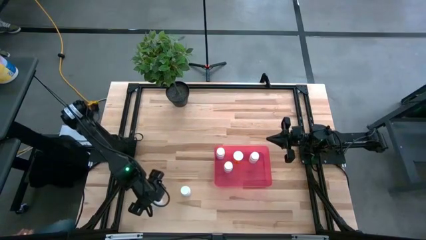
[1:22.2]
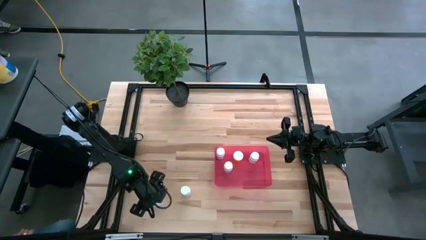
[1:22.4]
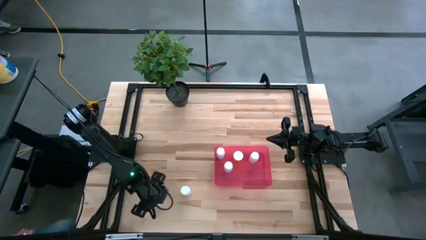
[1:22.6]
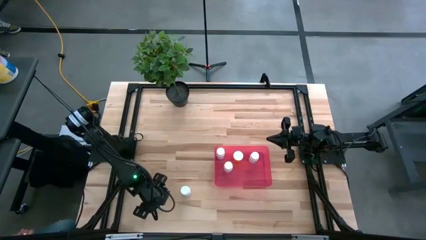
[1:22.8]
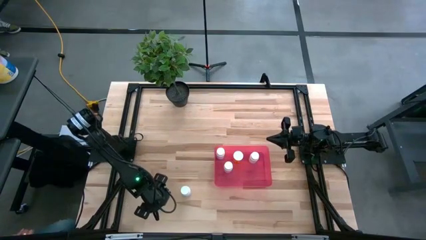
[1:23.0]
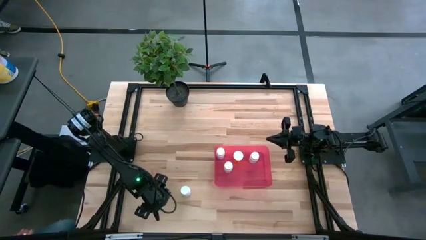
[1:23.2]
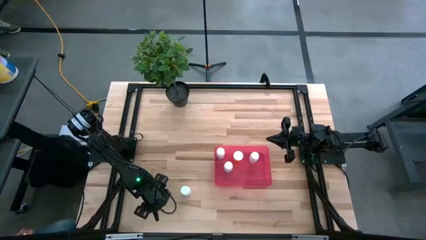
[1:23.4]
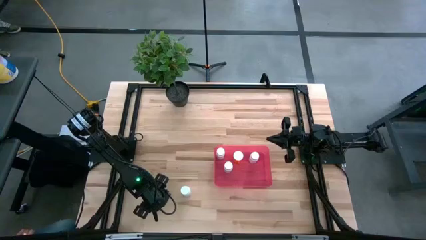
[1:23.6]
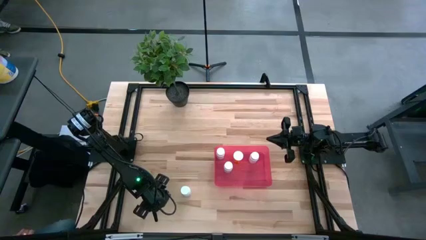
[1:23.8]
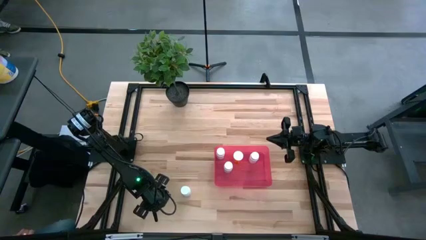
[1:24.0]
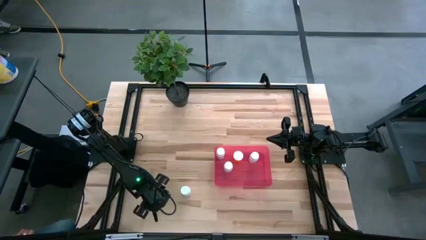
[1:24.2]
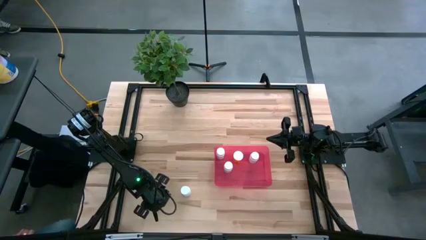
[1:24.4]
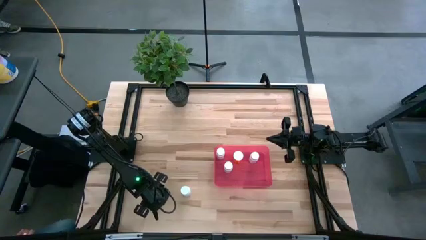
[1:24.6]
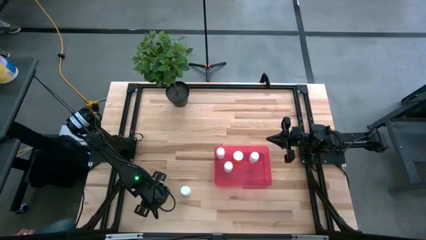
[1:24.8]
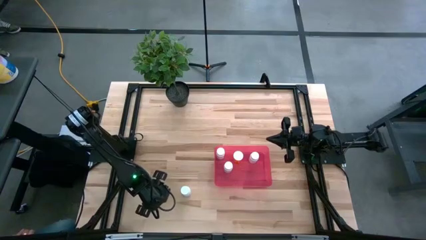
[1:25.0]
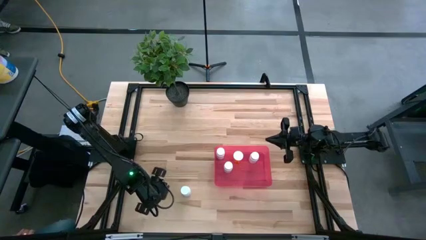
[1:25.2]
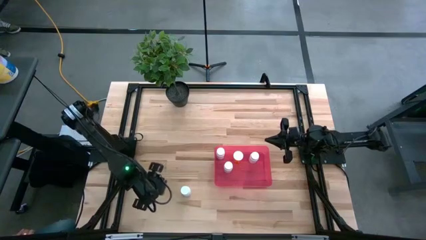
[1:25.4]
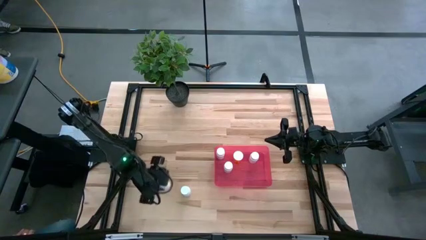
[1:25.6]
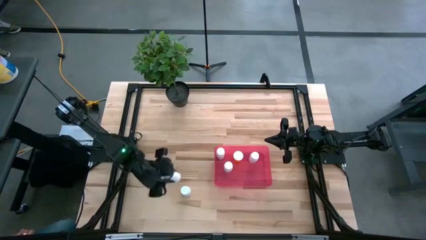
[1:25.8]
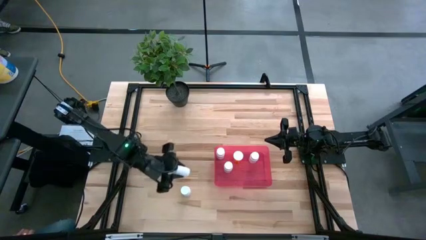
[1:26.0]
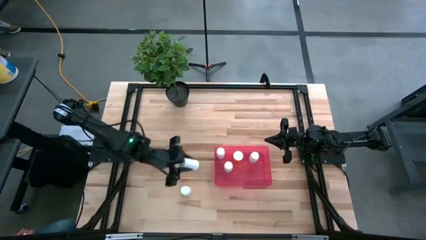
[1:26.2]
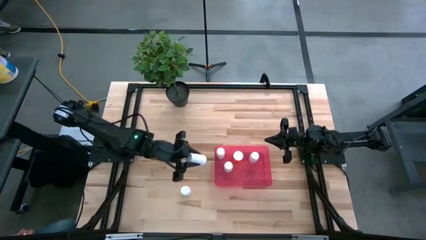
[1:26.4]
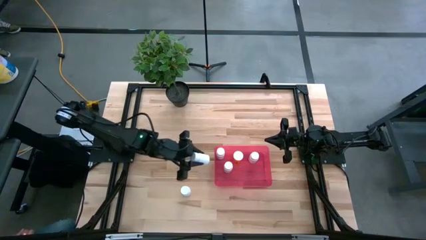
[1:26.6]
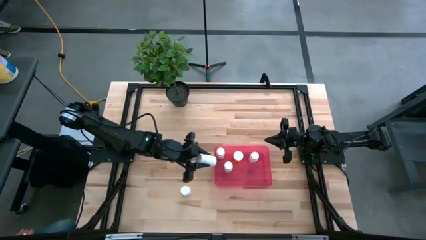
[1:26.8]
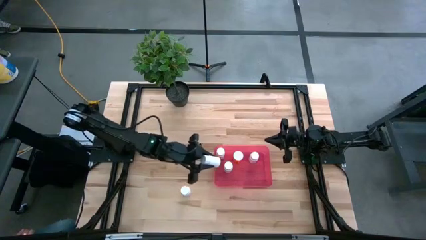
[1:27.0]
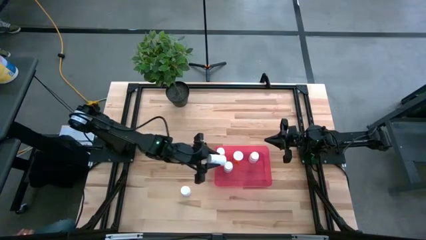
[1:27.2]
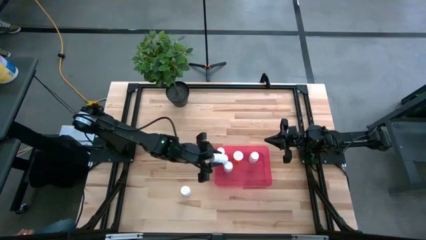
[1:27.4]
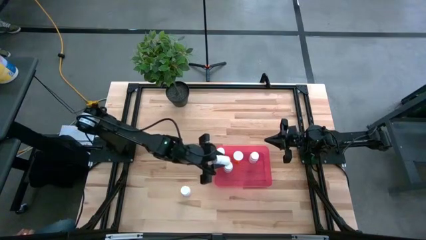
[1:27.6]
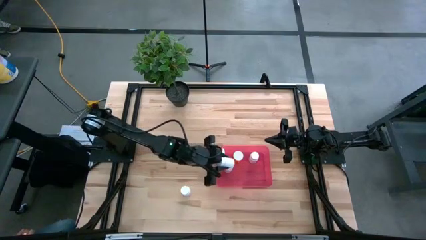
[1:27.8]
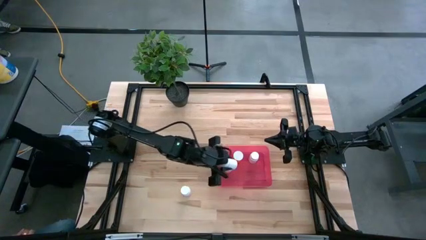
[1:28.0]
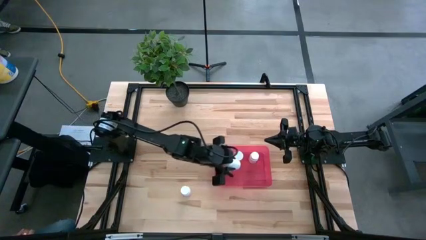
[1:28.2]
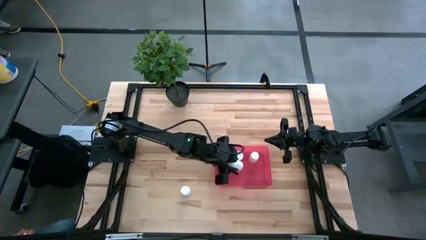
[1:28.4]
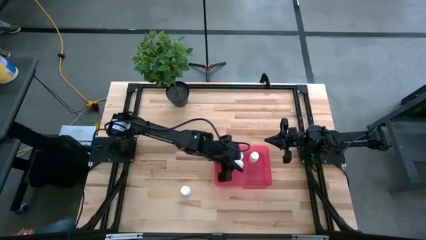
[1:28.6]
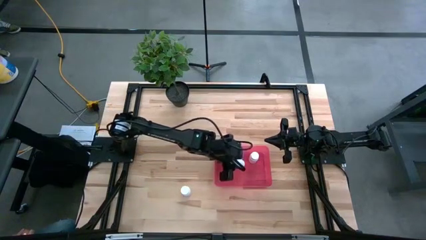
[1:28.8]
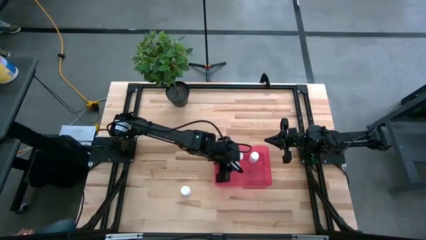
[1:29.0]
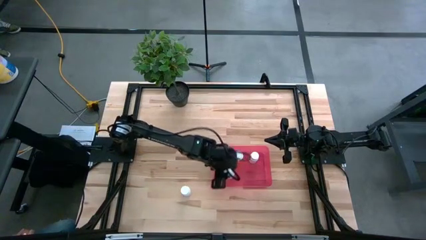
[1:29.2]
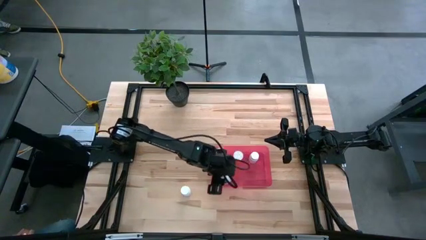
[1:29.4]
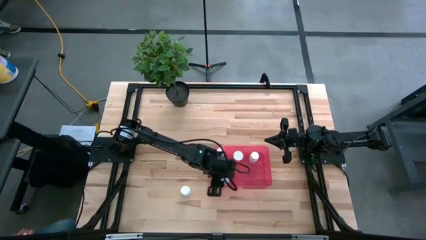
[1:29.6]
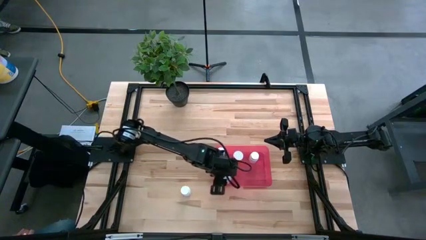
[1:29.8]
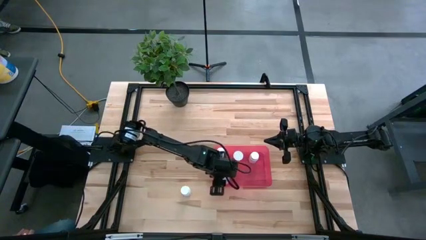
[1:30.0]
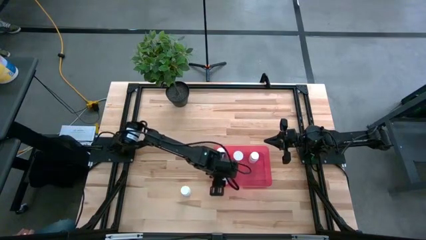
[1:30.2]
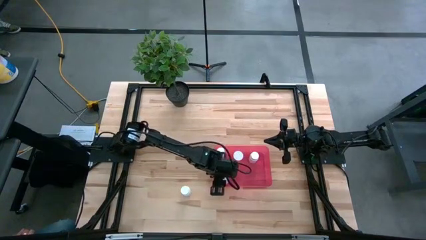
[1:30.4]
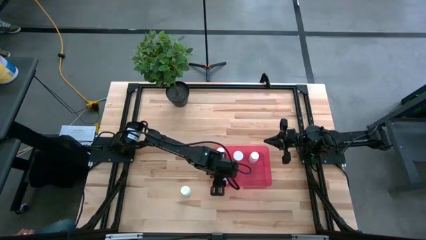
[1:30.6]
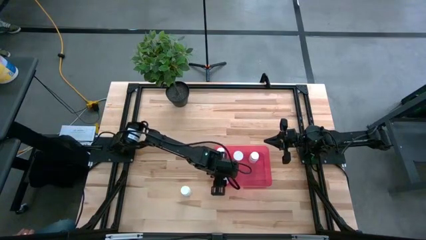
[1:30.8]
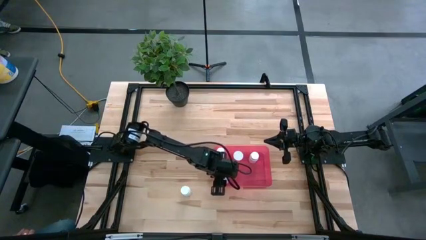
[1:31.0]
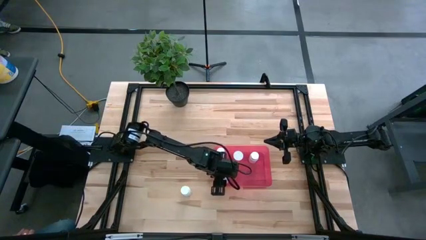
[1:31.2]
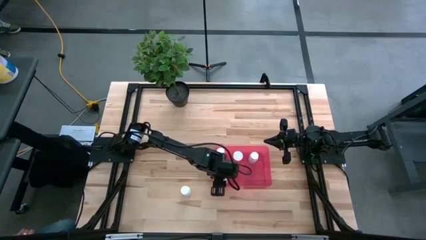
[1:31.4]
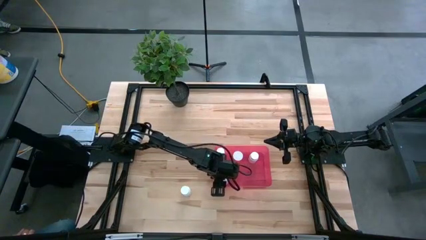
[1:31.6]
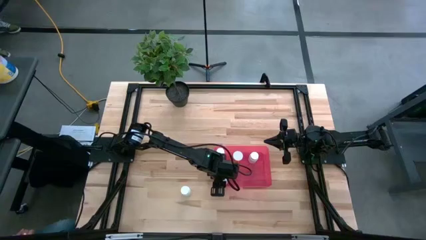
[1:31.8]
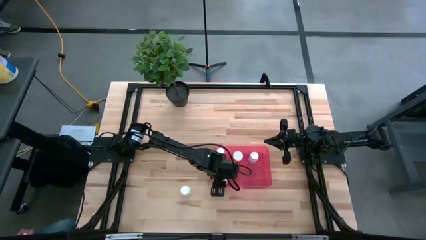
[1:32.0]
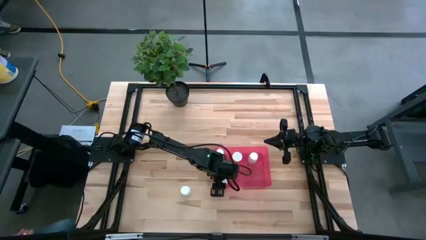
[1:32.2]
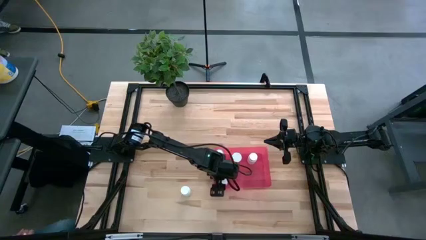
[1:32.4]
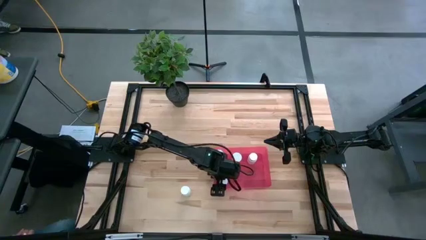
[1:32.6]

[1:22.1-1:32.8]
Task: Pick and place pill bottles into a basket
Put the white pill bottle into the pink bin

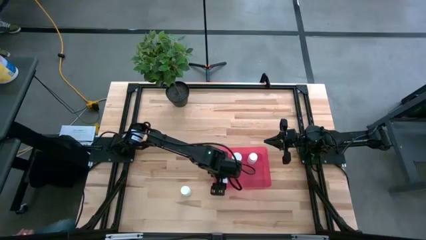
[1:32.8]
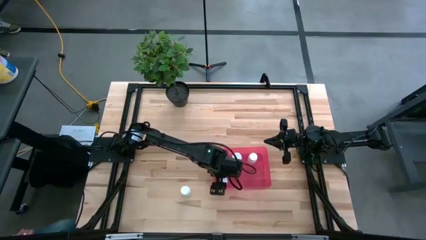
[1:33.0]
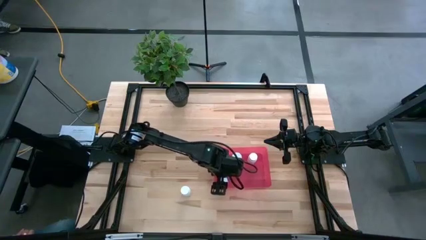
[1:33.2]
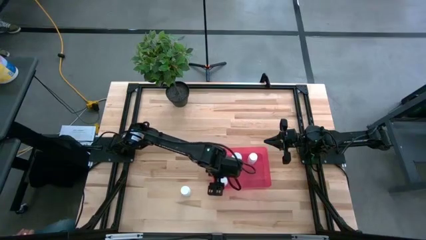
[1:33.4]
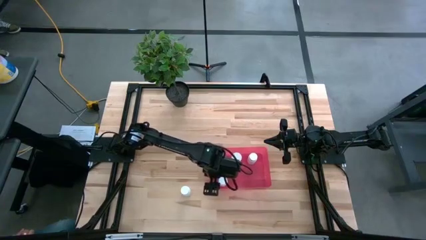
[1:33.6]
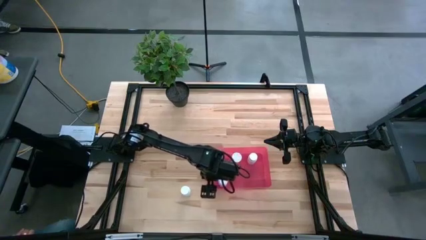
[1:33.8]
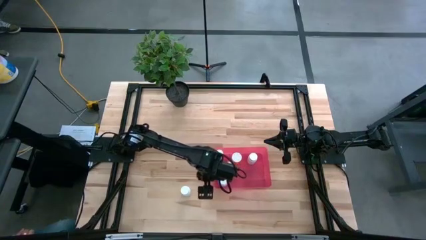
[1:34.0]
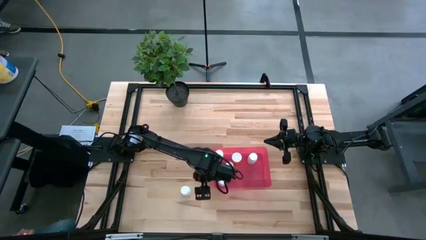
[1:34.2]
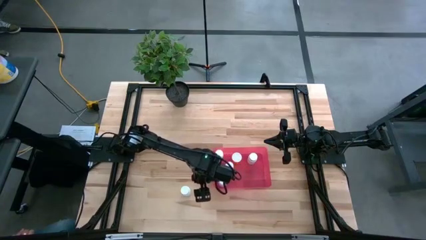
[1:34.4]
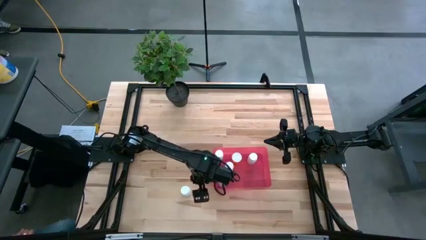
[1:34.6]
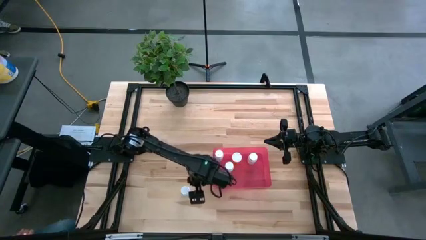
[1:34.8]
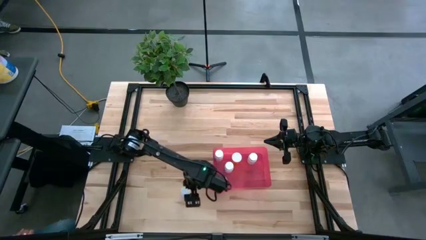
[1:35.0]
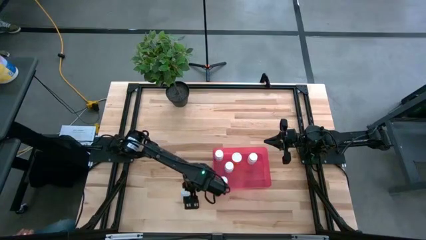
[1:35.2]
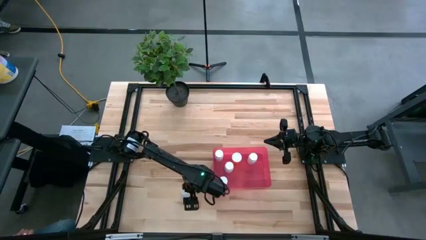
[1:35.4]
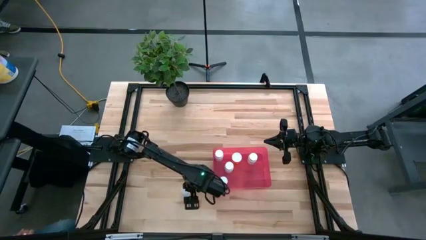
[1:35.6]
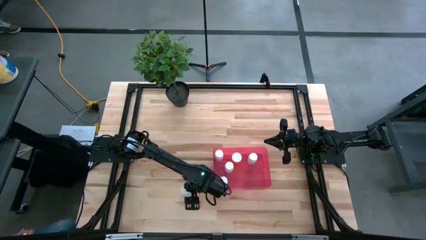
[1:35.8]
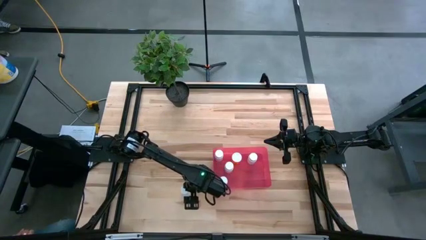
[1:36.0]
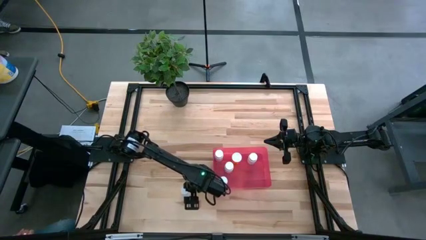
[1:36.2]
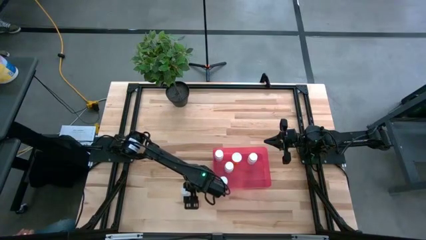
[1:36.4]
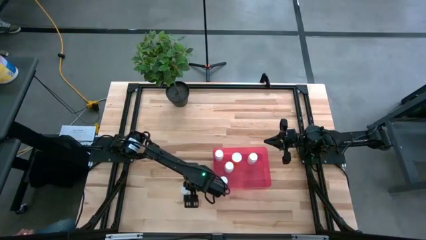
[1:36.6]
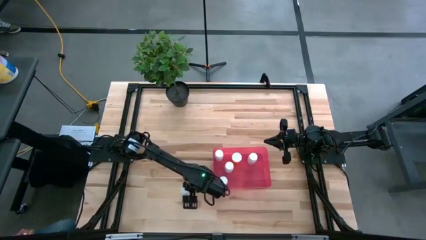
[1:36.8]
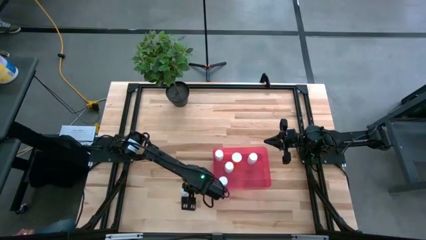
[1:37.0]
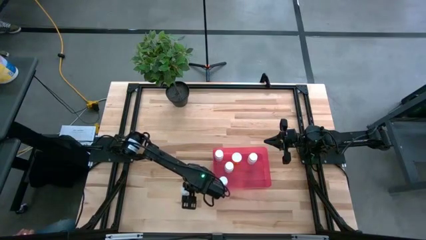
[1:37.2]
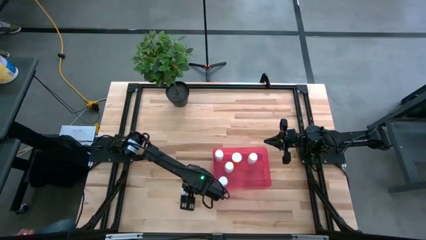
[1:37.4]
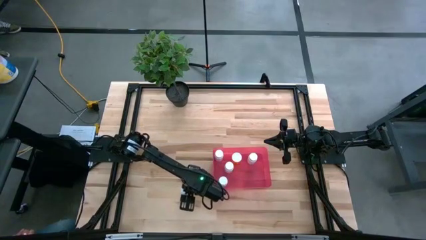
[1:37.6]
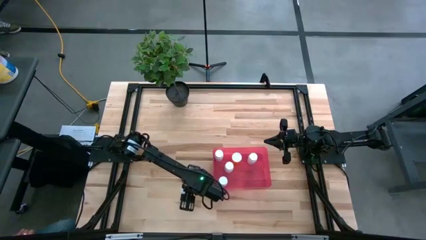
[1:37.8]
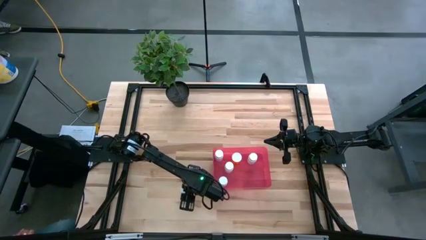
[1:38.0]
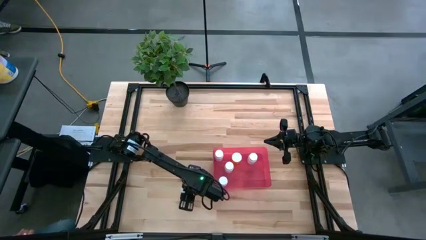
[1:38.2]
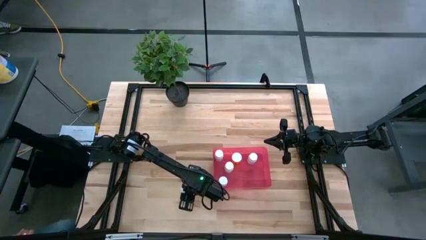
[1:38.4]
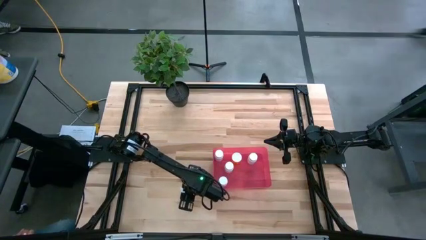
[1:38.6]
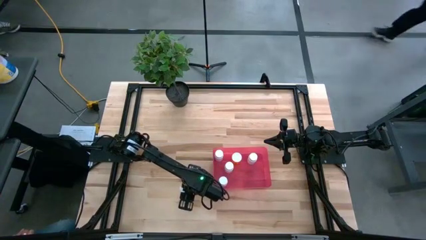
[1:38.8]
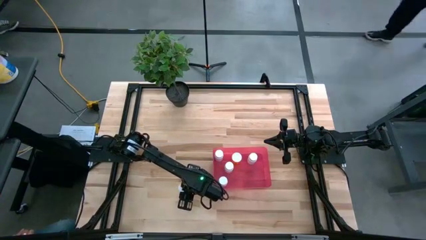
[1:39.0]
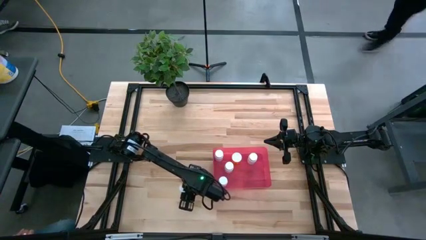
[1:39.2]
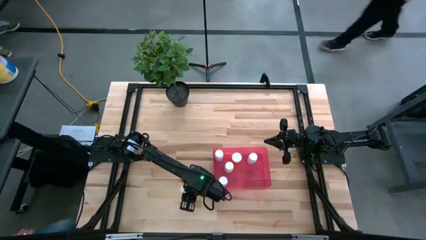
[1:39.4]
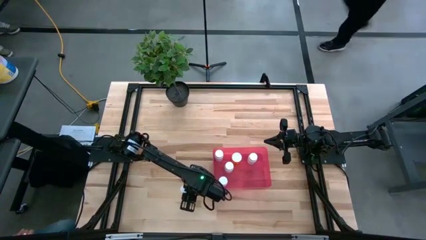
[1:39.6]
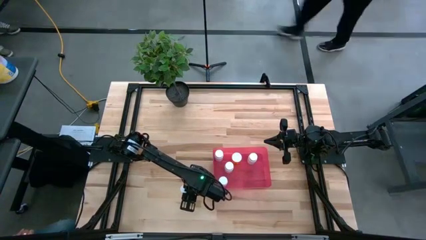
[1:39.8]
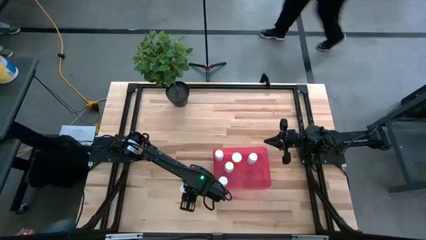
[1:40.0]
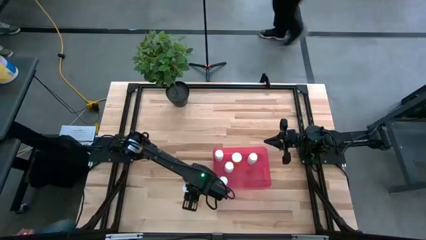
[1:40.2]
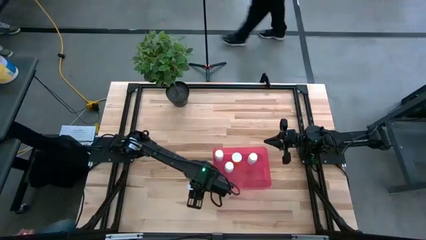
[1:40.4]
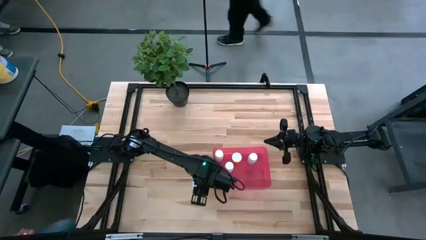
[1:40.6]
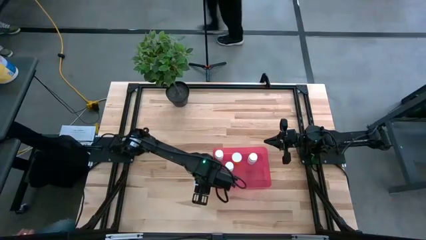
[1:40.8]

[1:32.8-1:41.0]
Put the white pill bottle into the pink bin
